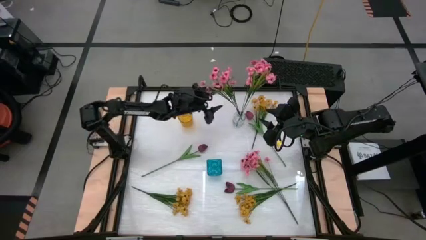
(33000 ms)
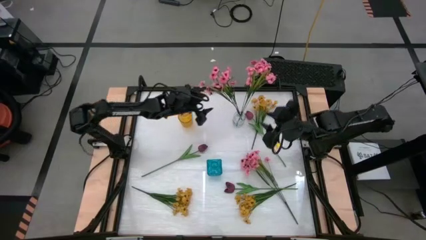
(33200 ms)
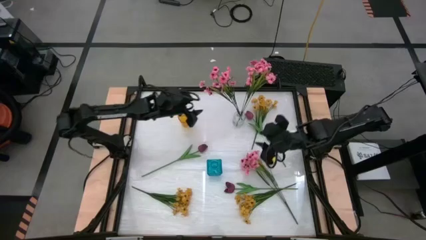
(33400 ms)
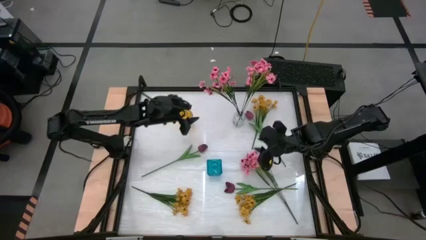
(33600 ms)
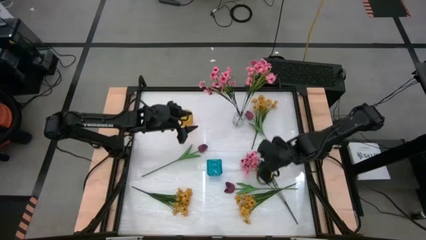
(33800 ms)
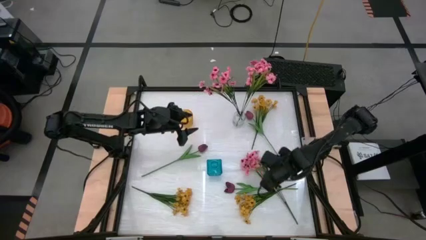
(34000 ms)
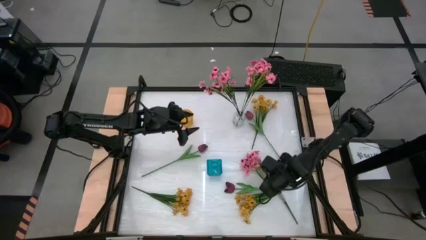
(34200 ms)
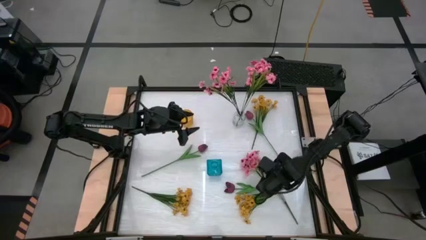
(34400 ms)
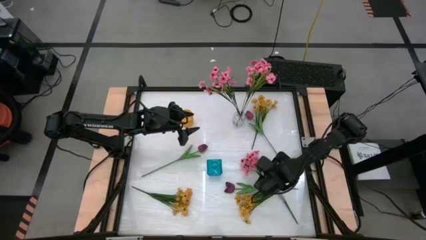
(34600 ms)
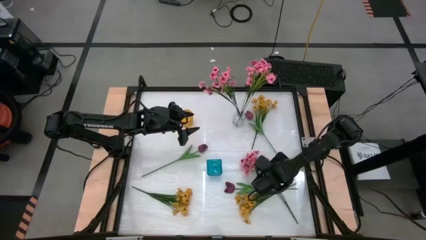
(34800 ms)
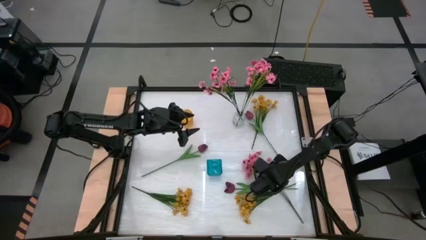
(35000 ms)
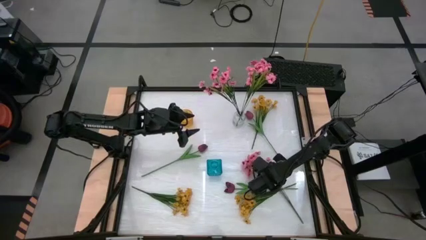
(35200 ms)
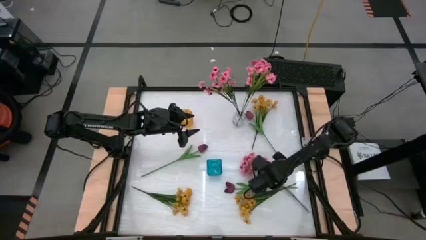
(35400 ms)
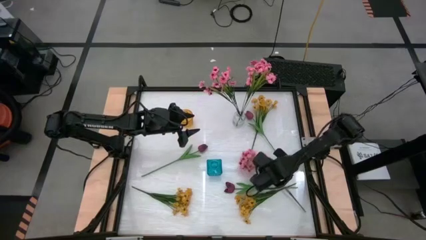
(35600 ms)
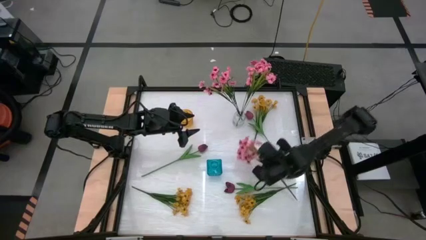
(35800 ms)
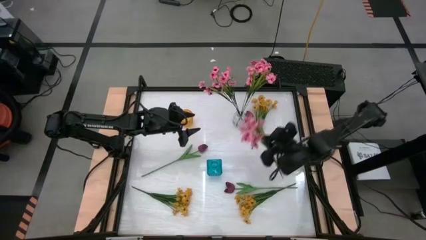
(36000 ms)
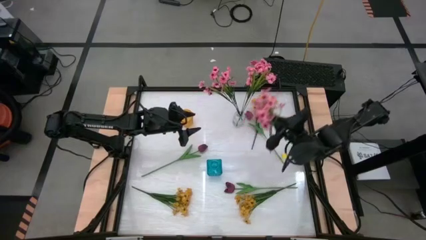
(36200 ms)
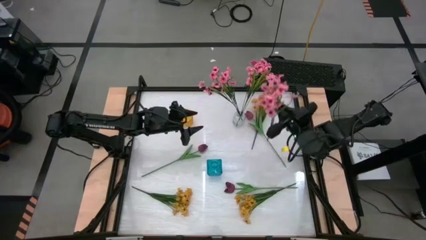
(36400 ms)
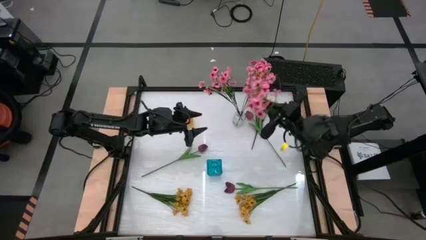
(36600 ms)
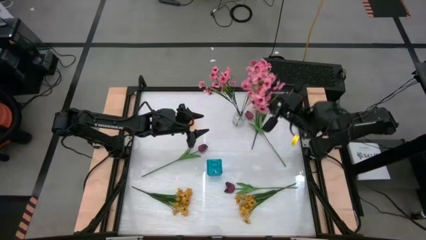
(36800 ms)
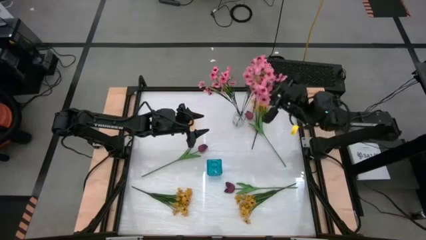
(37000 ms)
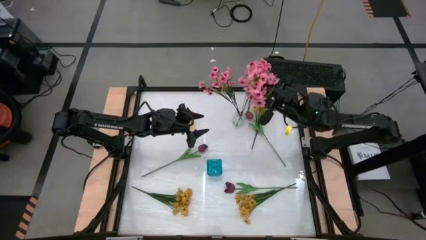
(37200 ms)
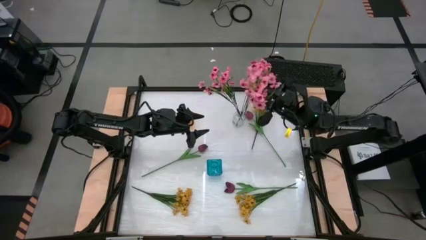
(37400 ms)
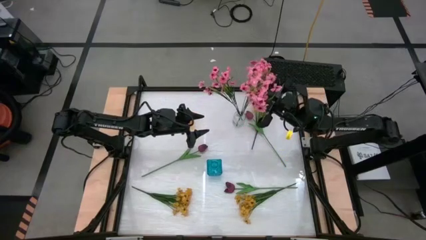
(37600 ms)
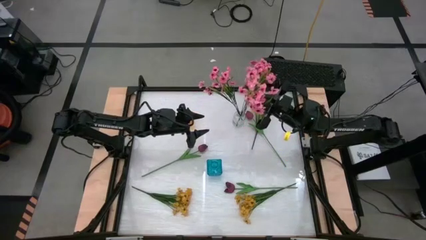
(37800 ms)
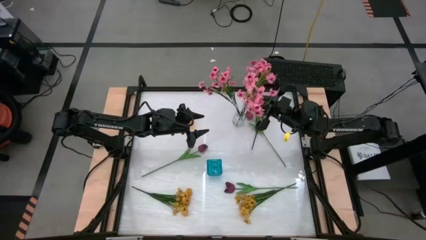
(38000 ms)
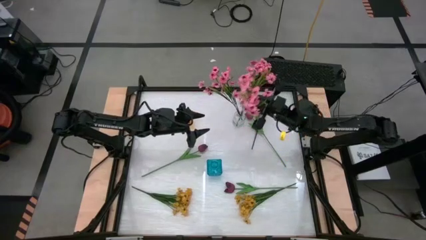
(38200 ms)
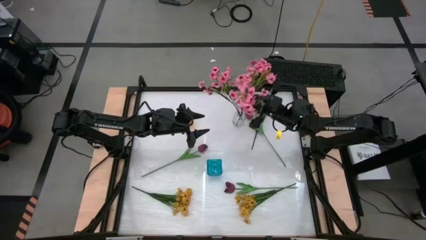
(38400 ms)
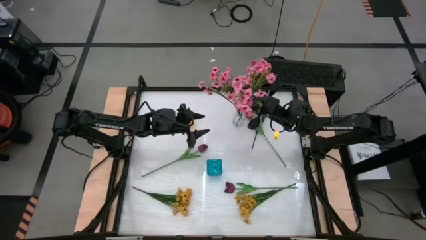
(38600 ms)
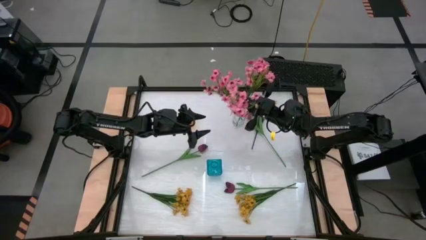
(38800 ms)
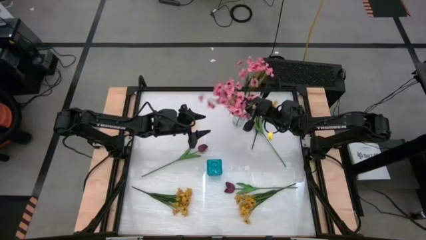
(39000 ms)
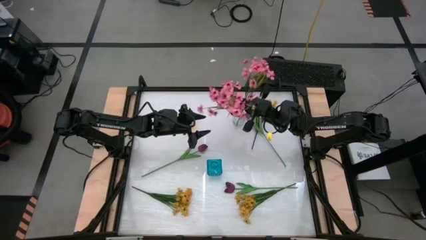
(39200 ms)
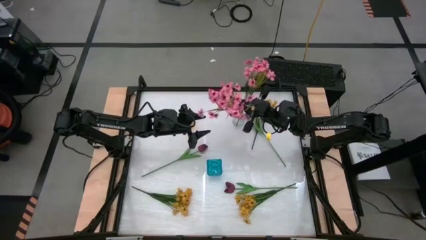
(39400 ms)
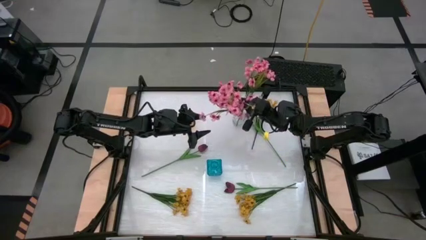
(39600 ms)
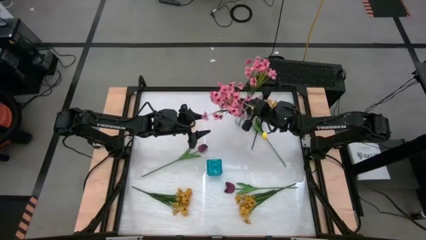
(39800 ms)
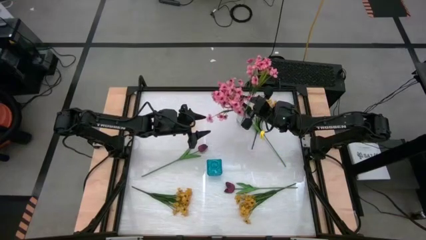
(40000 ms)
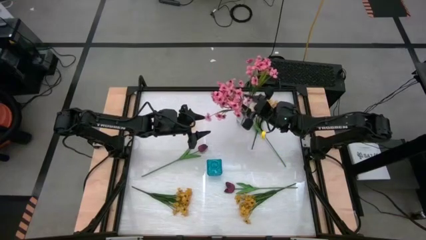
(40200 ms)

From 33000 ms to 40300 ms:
Task: Sort flowers into vase by color
Put the pink flower into the transparent vase

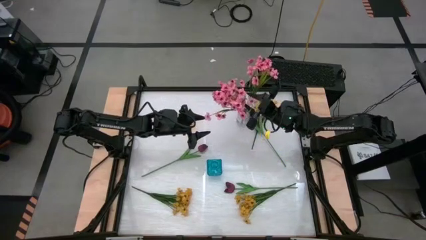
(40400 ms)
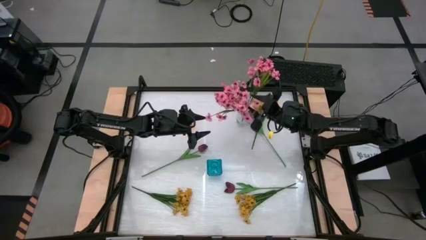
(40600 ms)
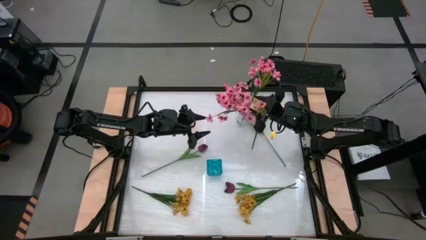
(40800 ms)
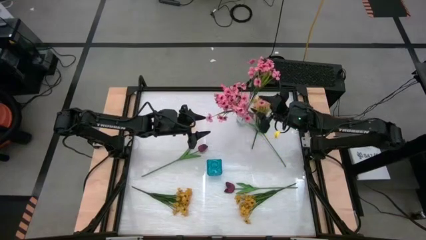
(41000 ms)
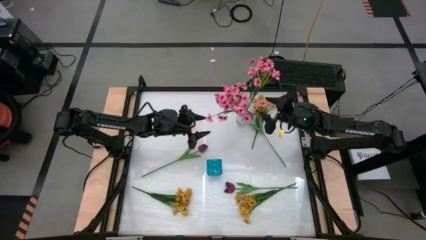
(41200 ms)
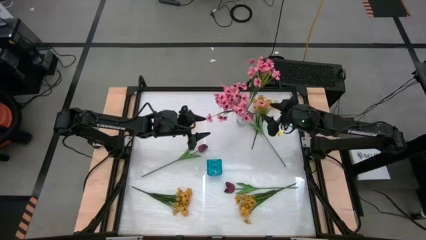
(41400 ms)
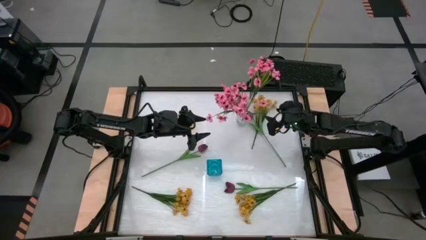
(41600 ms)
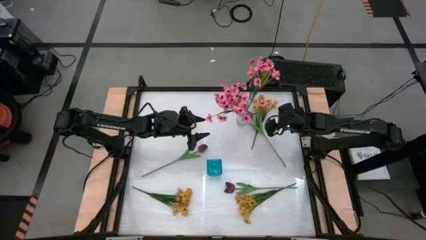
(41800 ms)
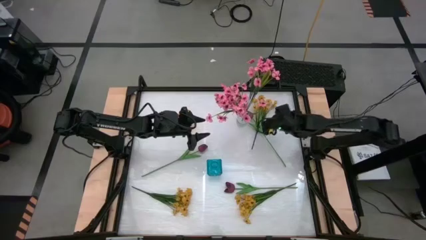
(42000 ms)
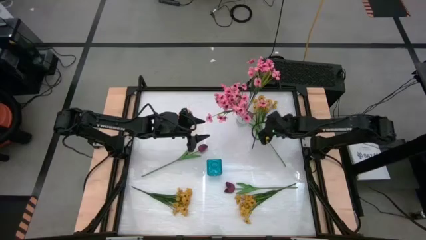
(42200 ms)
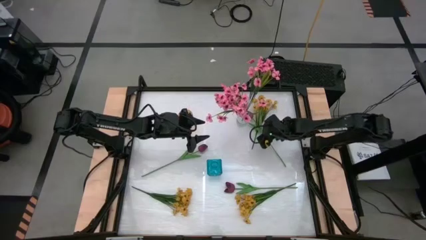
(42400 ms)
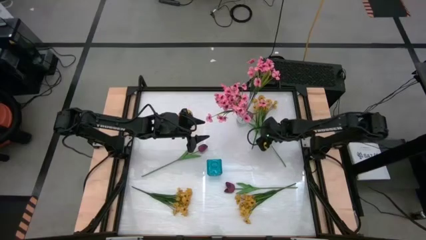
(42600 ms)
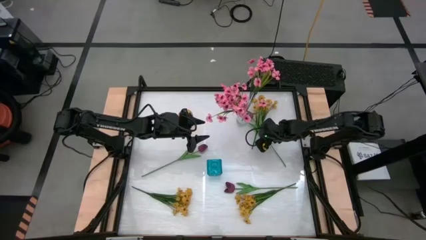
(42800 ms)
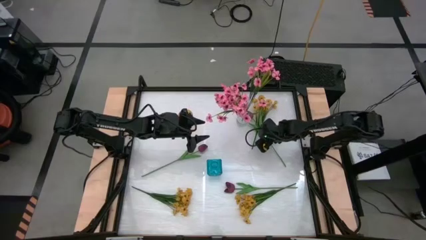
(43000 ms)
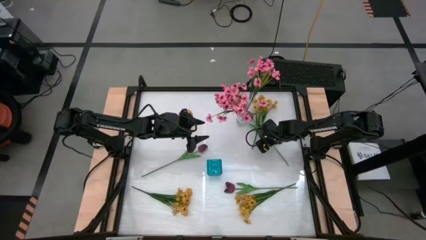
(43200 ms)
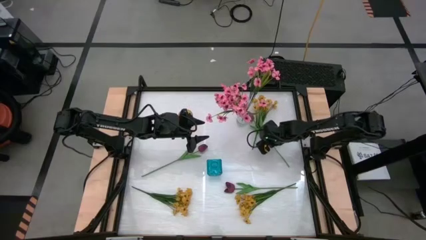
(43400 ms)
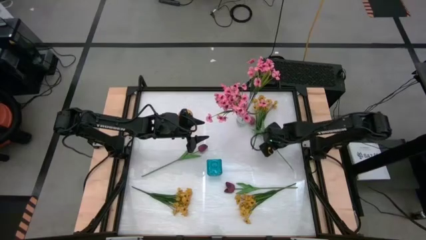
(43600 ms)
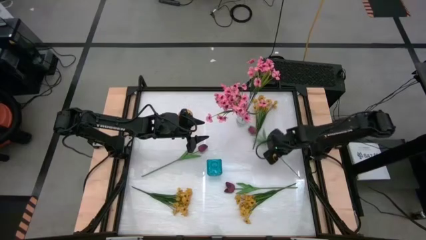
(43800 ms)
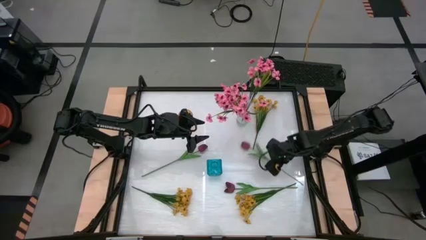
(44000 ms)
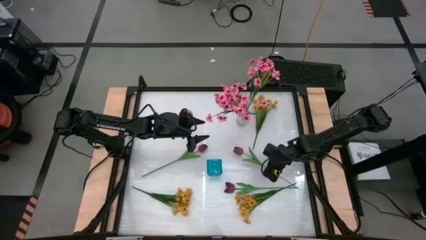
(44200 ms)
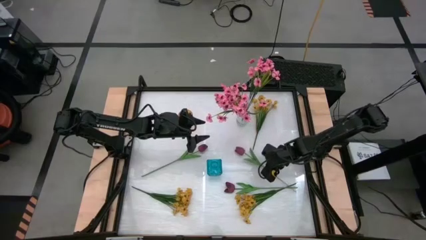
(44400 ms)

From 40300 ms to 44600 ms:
Move the top dark red flower to the middle right of the table
